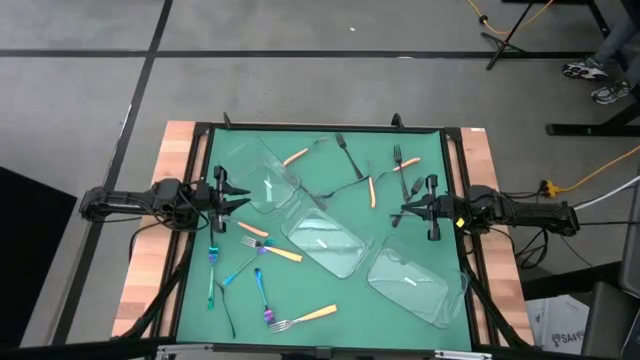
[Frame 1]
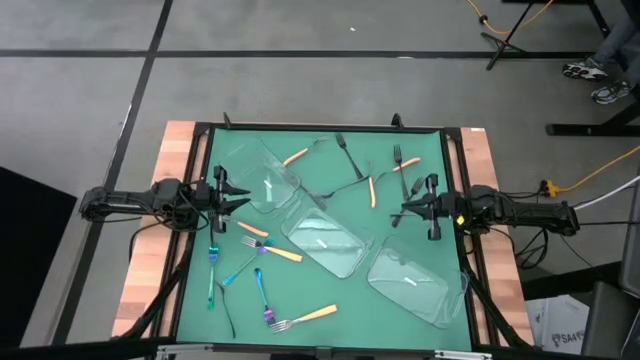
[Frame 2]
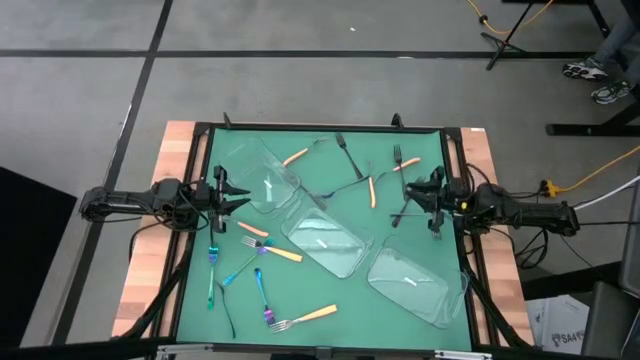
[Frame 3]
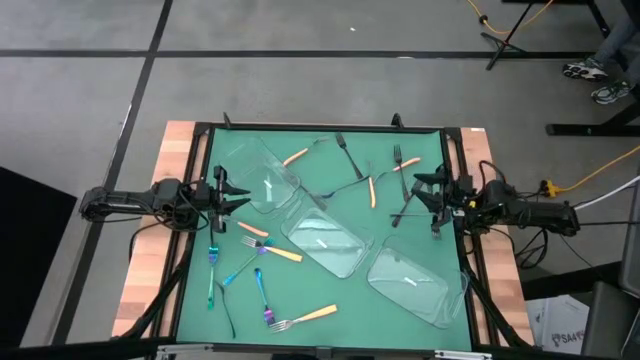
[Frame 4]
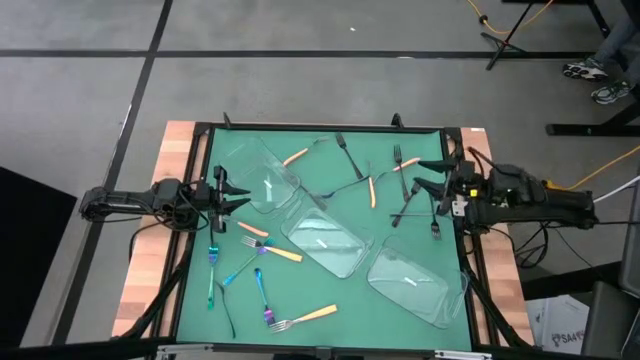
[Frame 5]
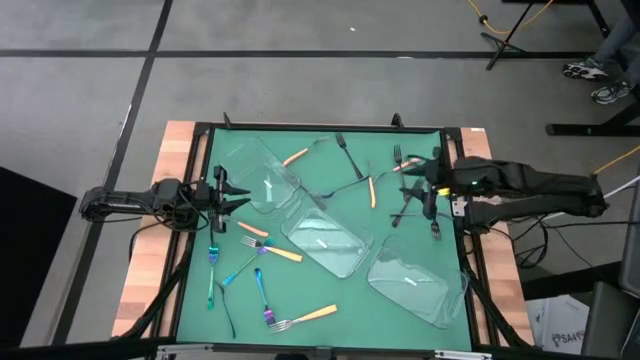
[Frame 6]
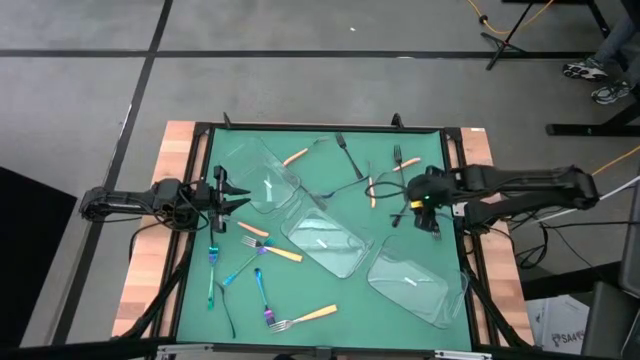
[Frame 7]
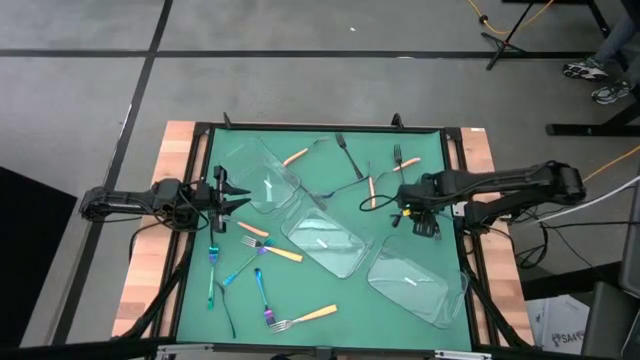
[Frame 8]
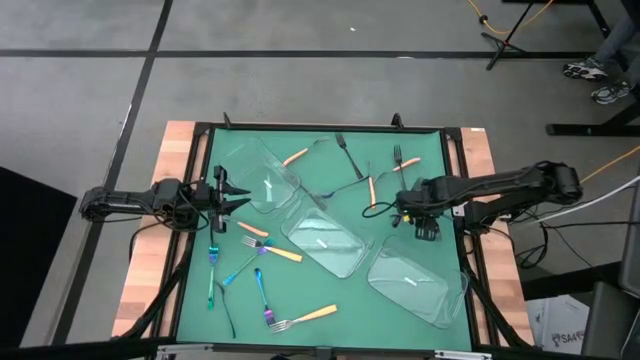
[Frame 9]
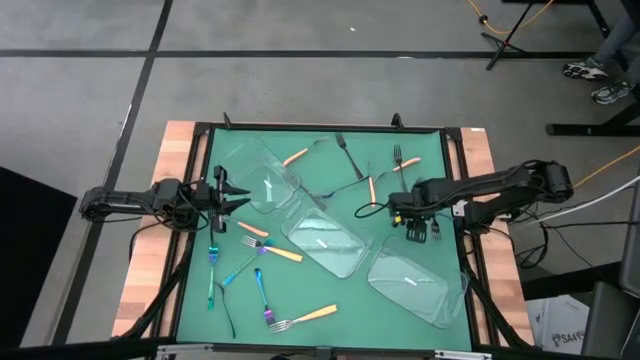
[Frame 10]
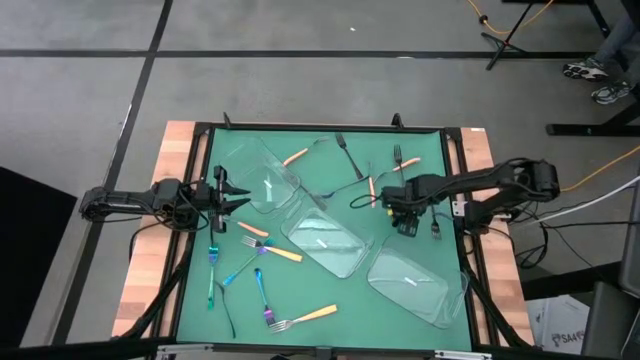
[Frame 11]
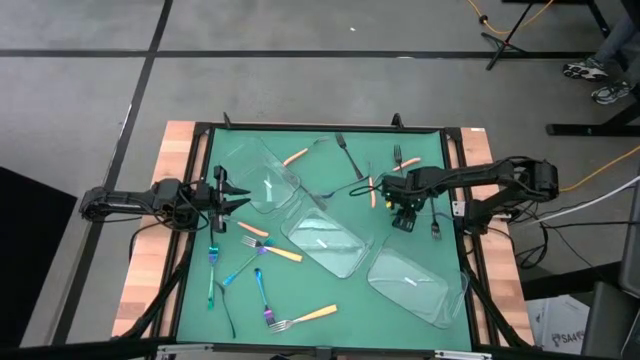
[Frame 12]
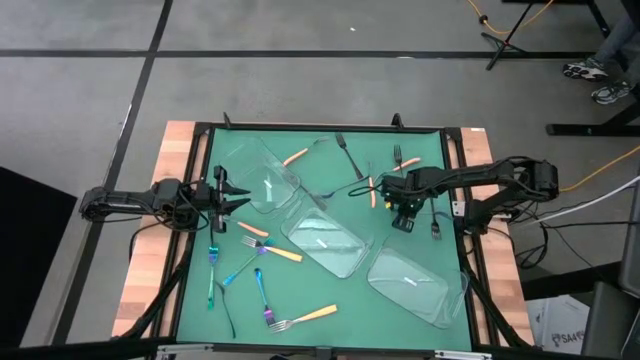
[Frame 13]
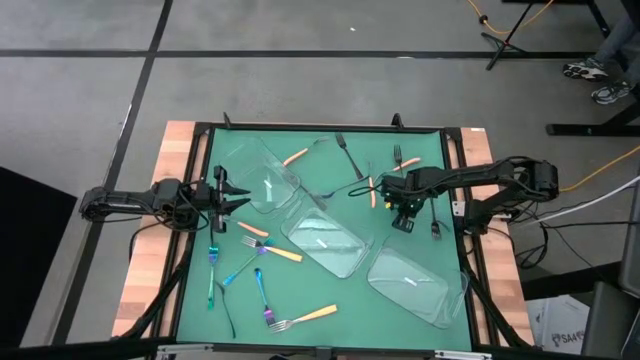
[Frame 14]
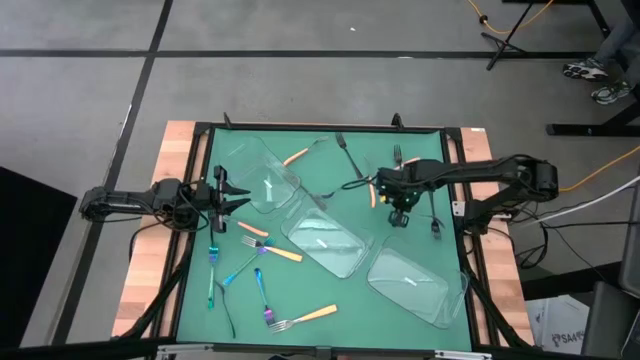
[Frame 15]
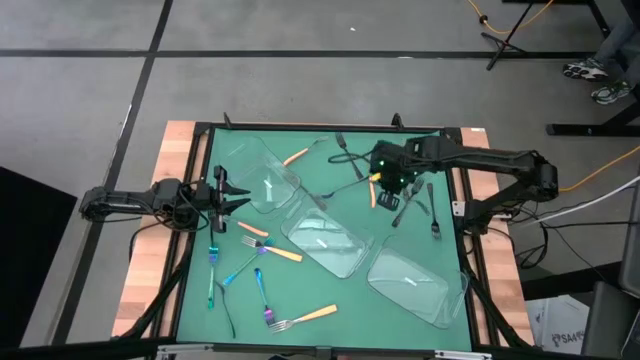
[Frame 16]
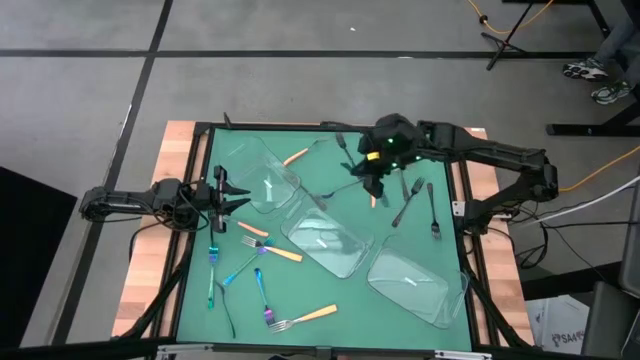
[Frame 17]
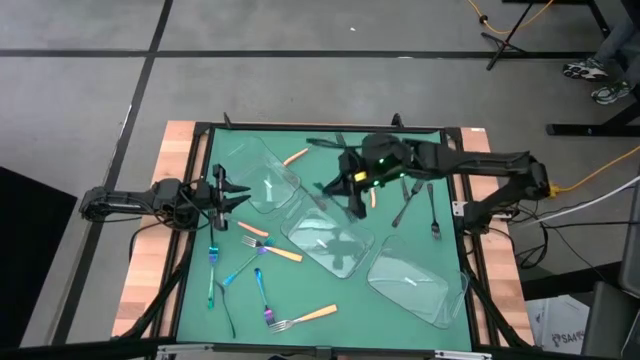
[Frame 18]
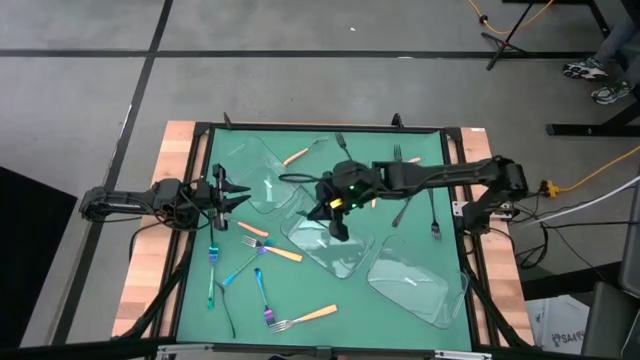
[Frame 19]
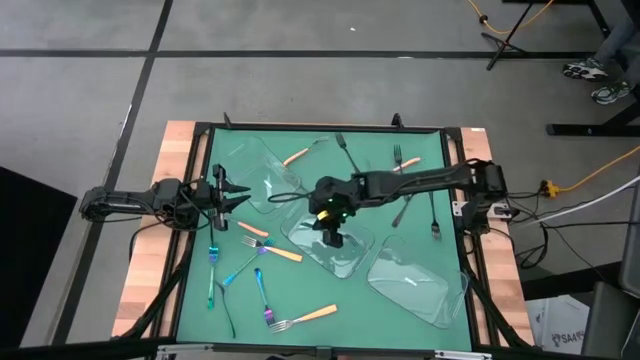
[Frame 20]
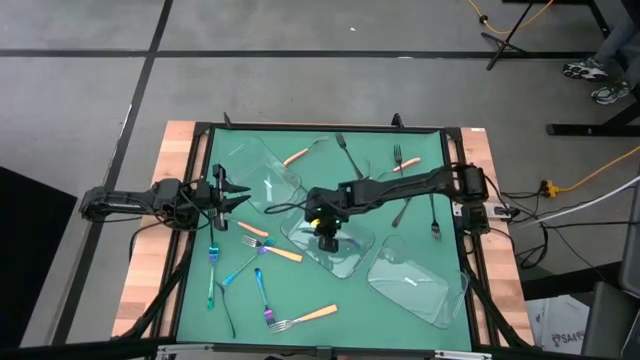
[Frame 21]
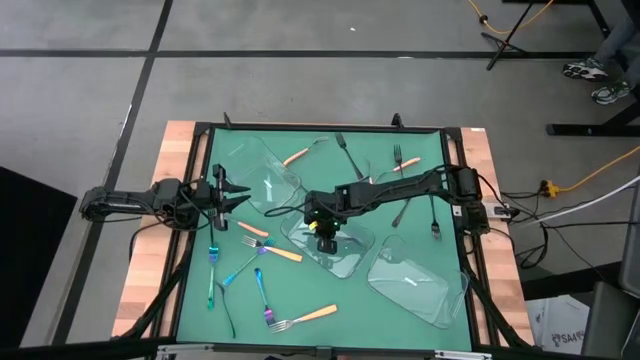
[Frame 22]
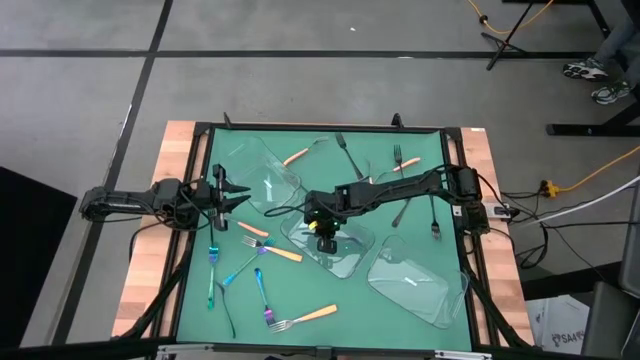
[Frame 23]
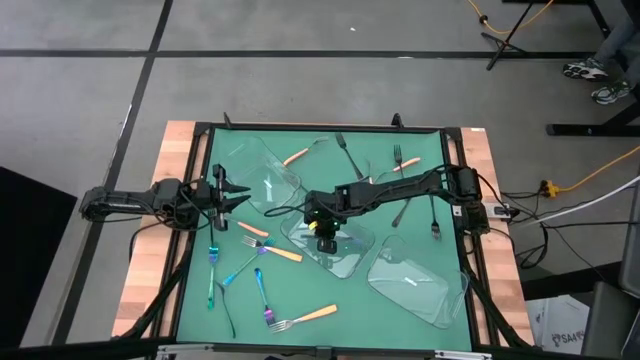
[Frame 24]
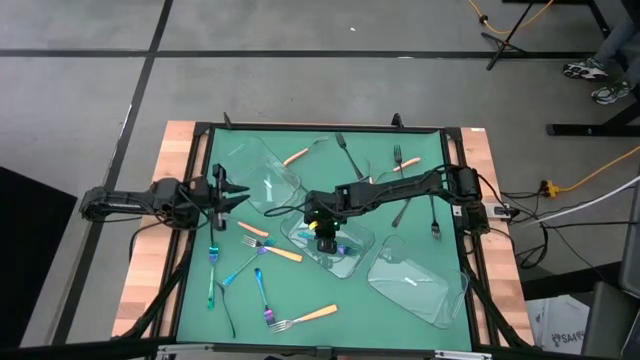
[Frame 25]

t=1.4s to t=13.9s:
Task: Sort silverware by color (type)
Put the blue fork into the center transparent bin

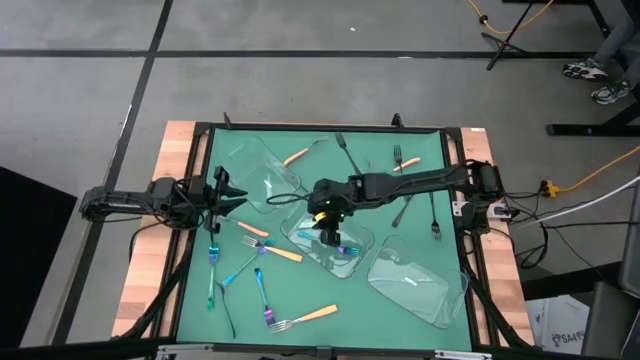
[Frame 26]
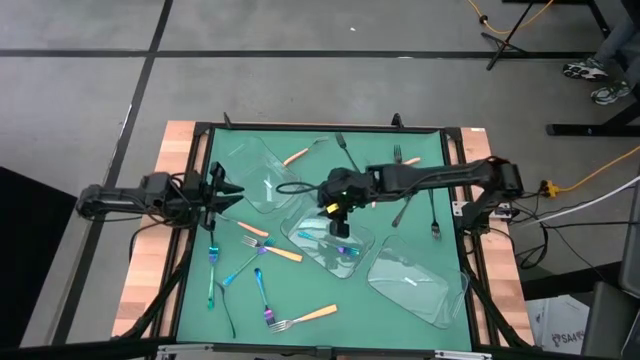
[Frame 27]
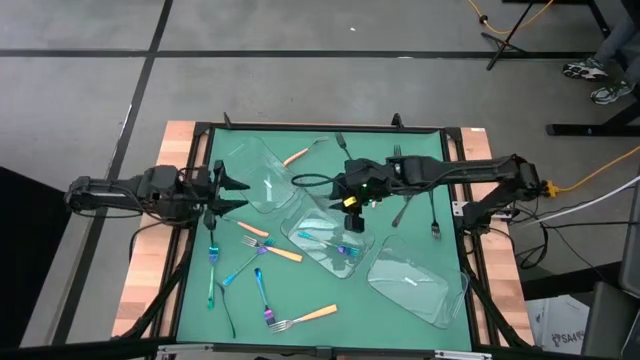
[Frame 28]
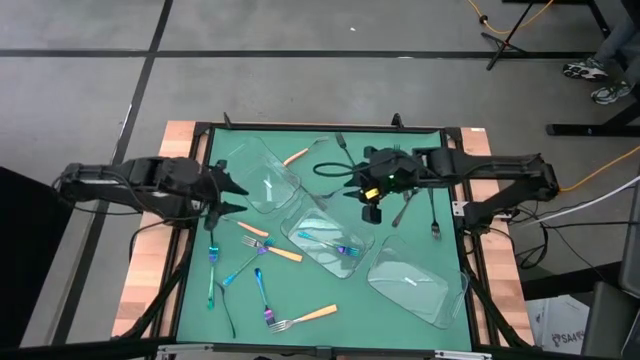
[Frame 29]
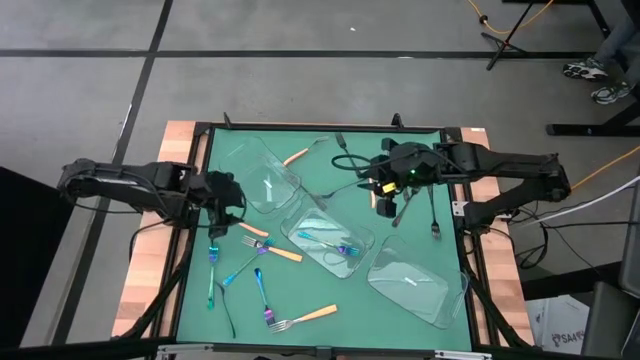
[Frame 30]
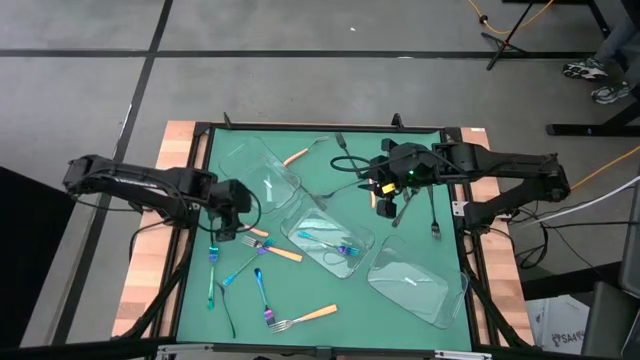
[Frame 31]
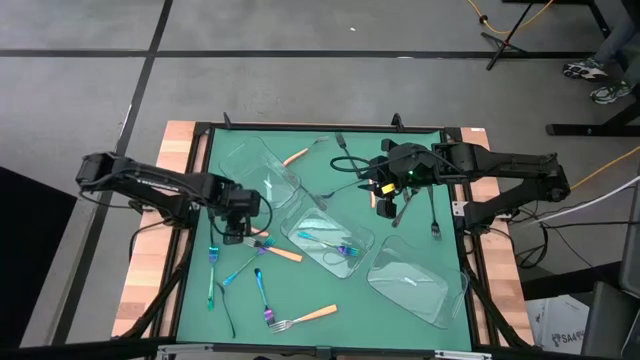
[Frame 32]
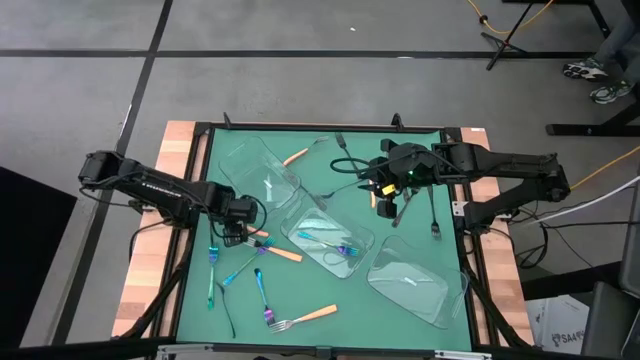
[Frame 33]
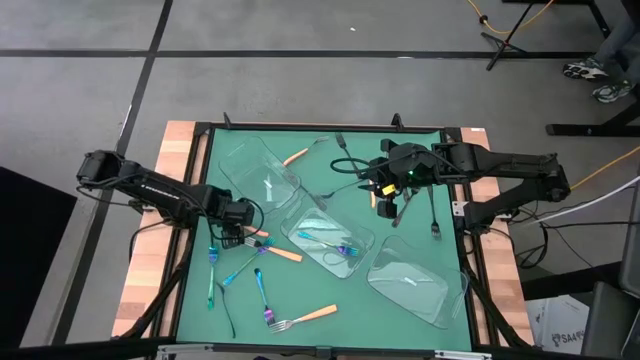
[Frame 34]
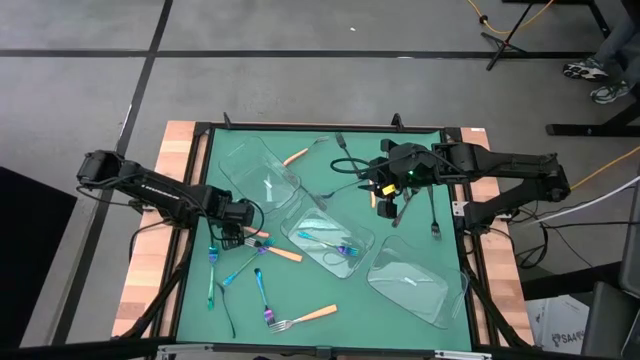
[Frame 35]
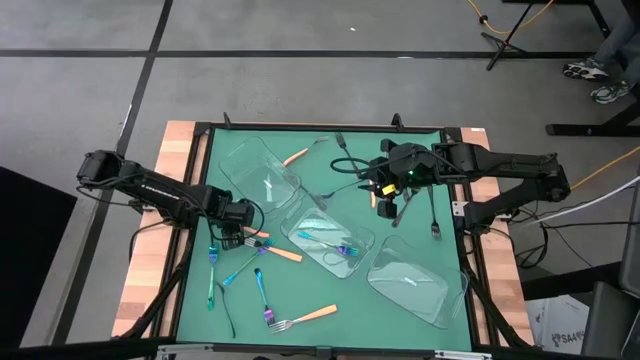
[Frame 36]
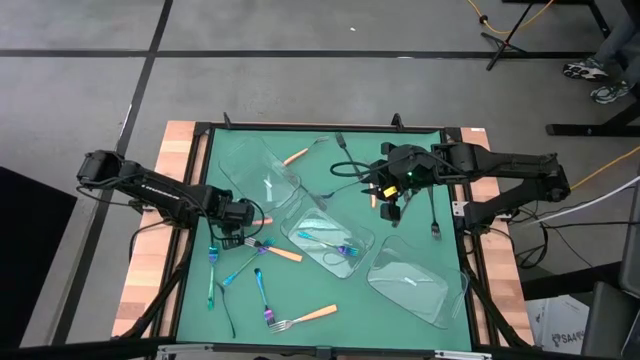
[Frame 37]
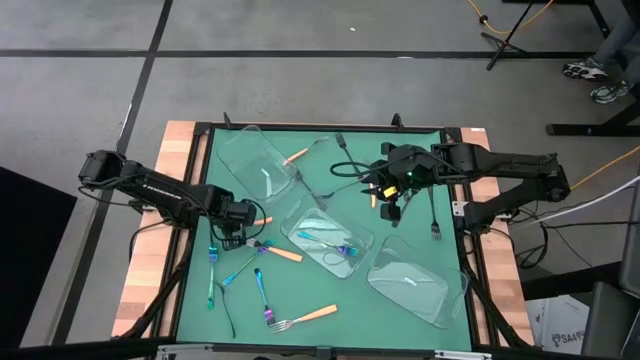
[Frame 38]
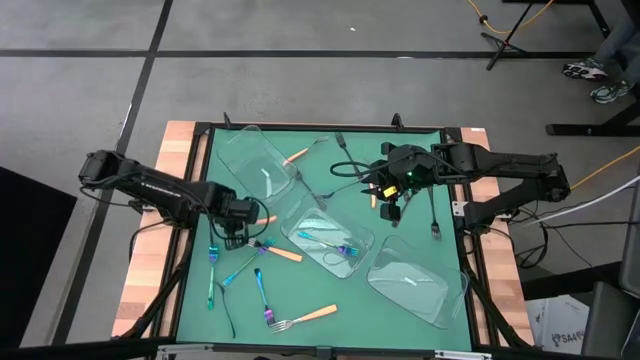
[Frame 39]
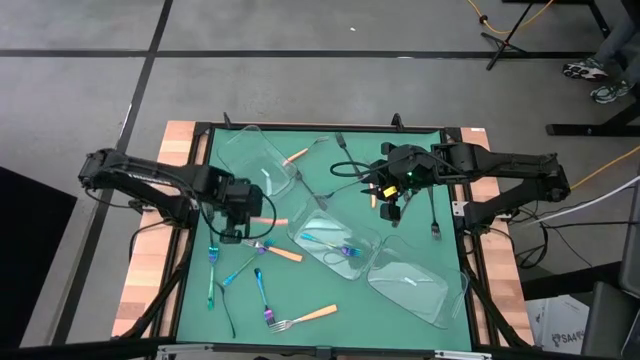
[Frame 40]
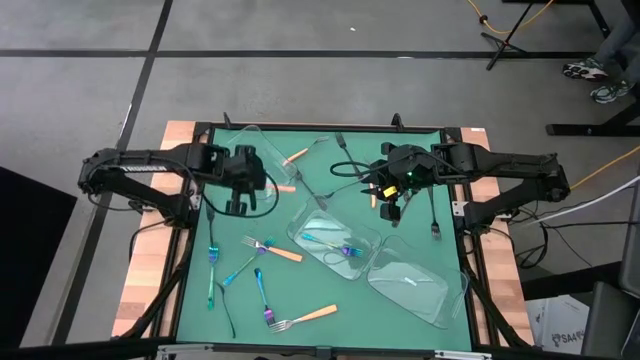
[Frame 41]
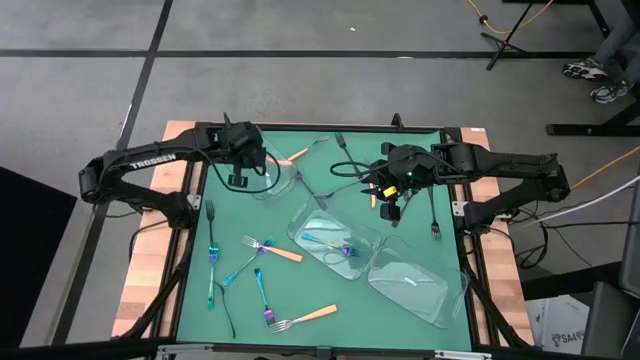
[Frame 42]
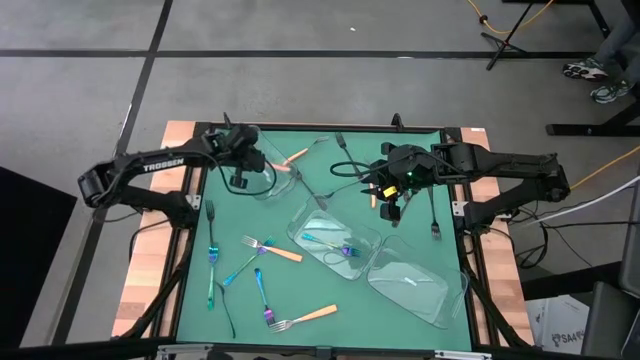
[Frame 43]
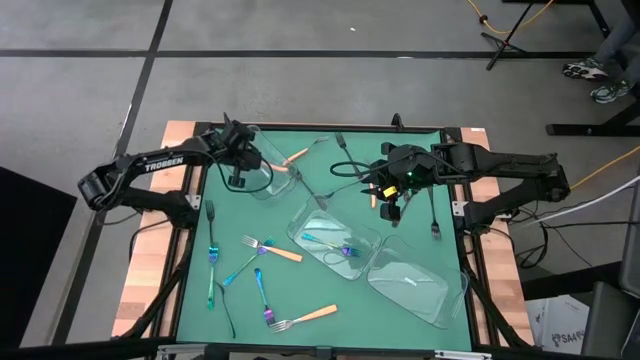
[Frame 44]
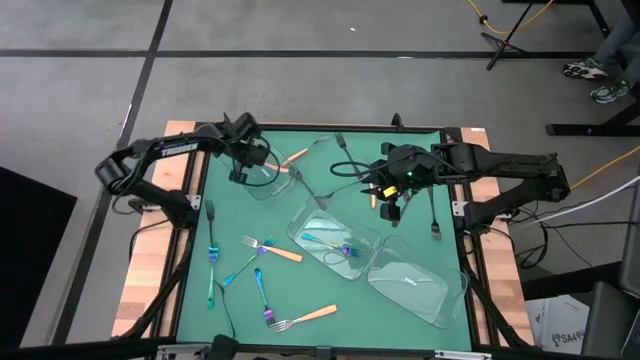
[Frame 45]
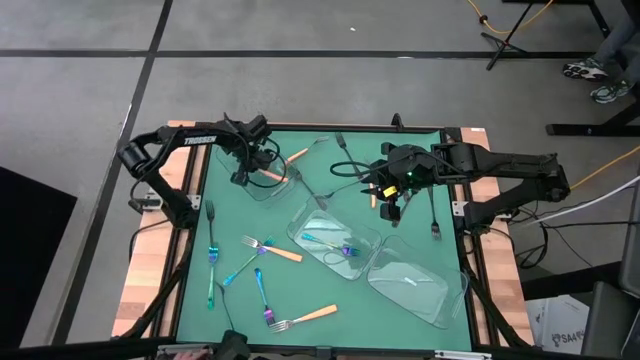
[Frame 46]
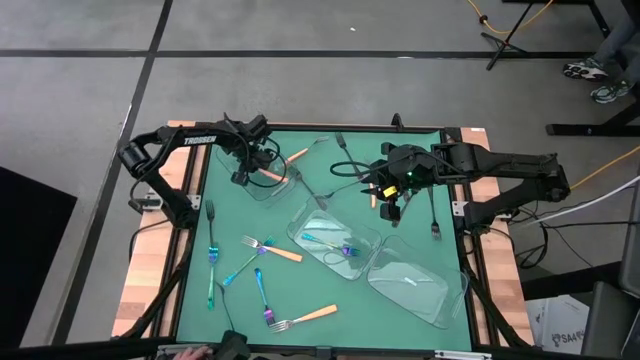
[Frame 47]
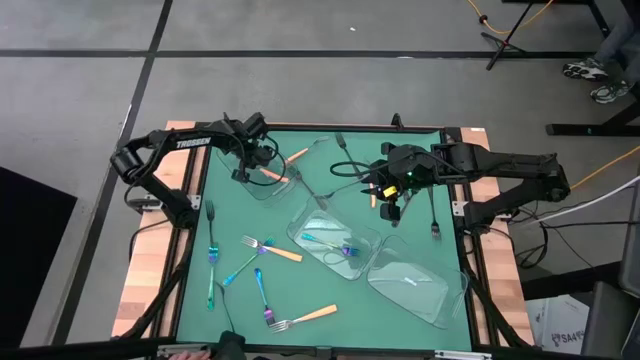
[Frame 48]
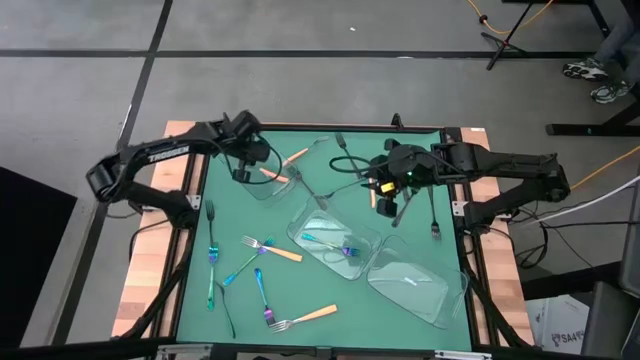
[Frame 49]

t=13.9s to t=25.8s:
Put the yellow fork into the top transparent bin
